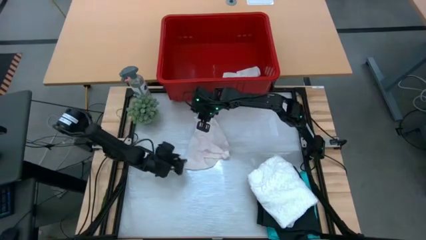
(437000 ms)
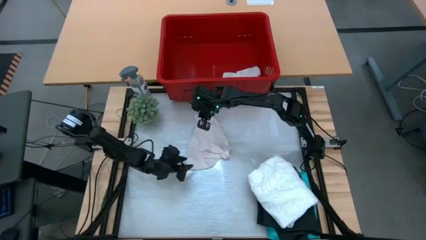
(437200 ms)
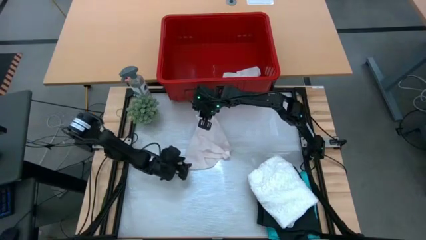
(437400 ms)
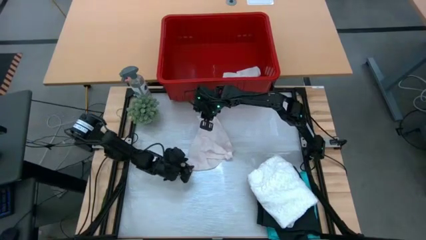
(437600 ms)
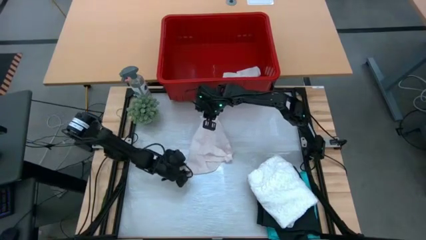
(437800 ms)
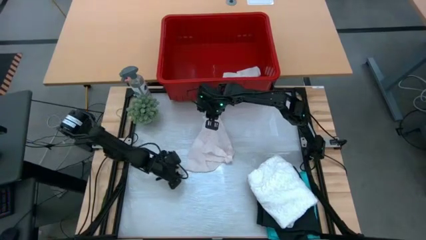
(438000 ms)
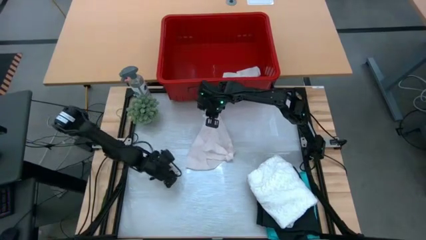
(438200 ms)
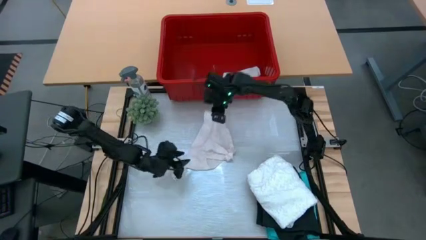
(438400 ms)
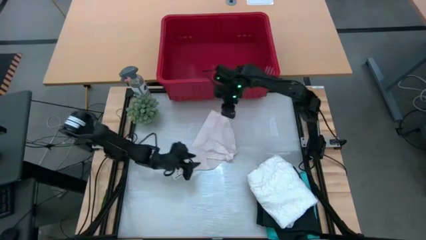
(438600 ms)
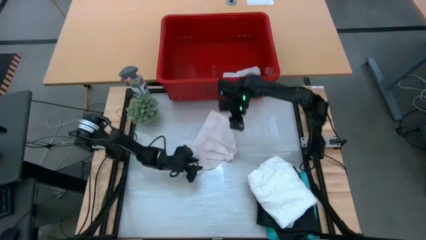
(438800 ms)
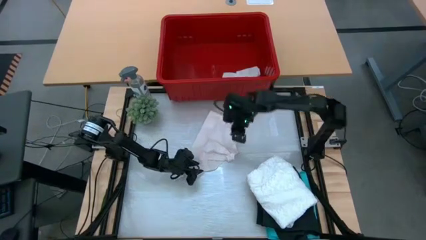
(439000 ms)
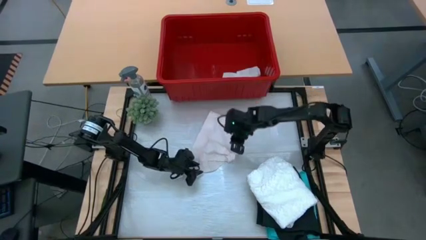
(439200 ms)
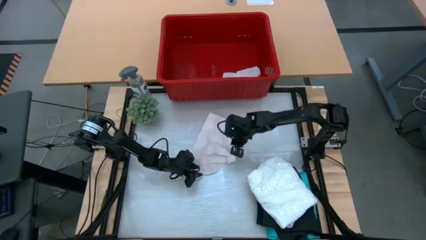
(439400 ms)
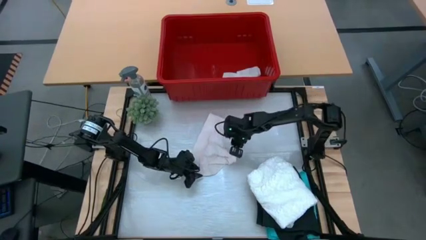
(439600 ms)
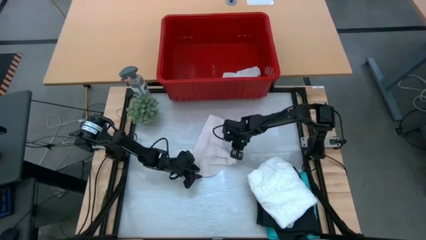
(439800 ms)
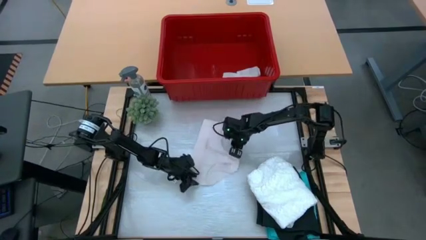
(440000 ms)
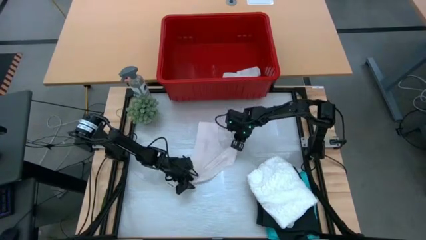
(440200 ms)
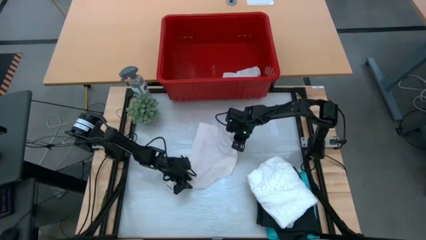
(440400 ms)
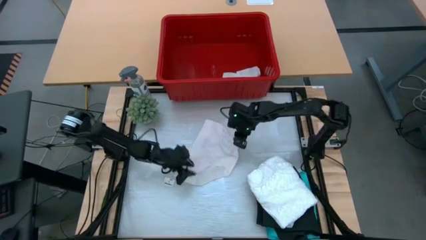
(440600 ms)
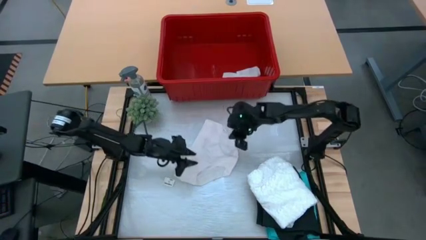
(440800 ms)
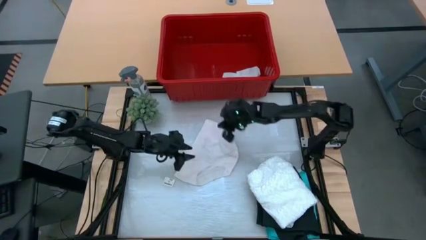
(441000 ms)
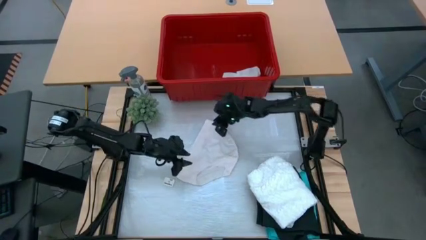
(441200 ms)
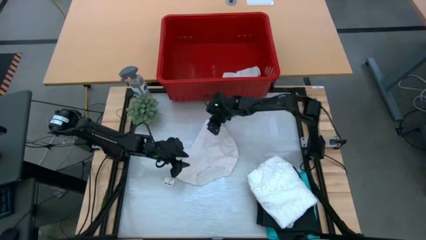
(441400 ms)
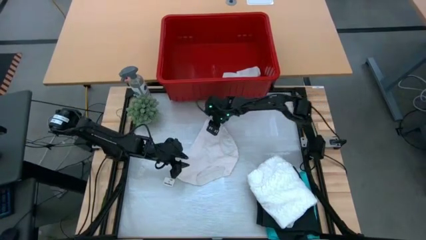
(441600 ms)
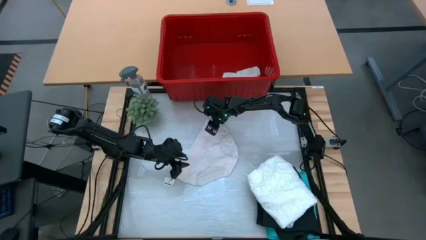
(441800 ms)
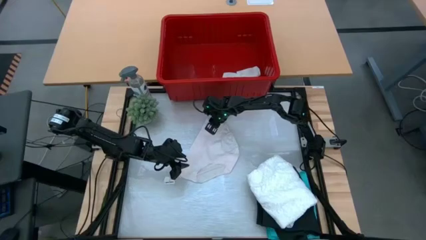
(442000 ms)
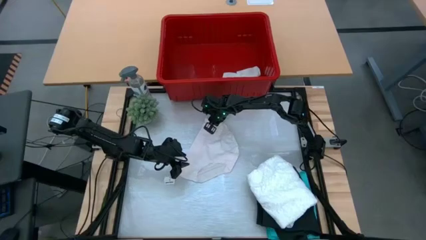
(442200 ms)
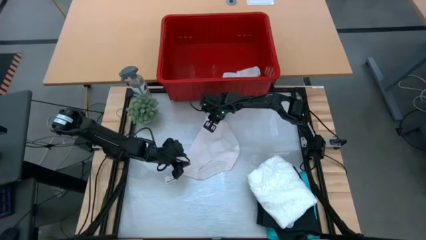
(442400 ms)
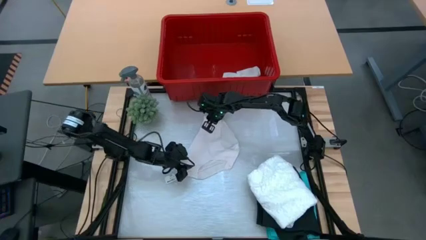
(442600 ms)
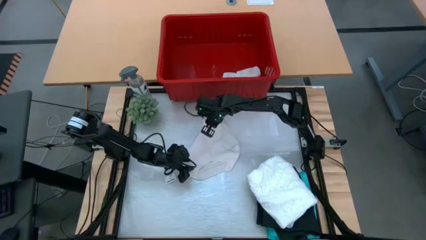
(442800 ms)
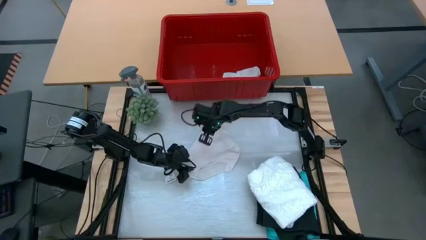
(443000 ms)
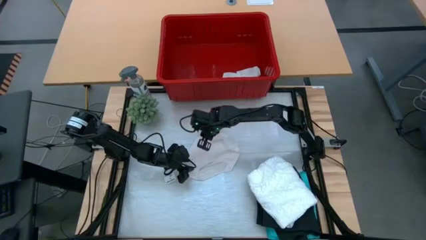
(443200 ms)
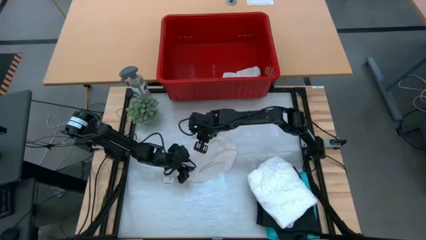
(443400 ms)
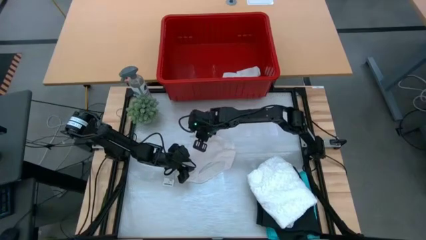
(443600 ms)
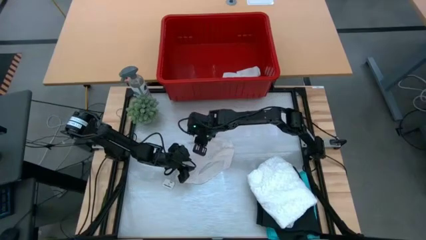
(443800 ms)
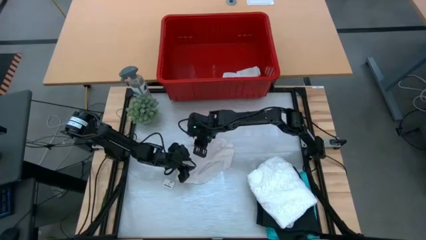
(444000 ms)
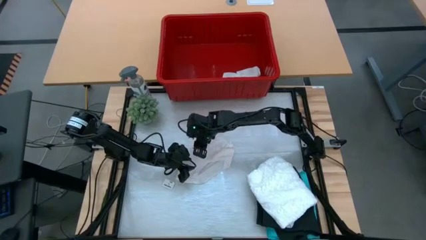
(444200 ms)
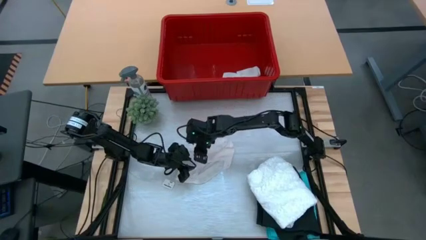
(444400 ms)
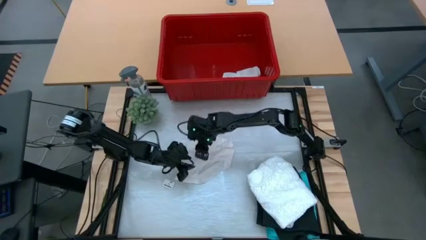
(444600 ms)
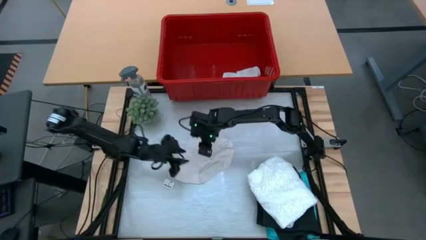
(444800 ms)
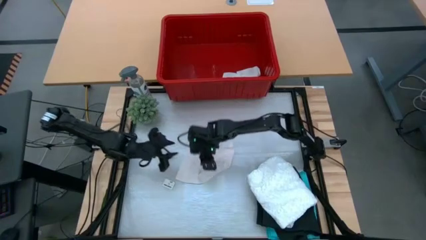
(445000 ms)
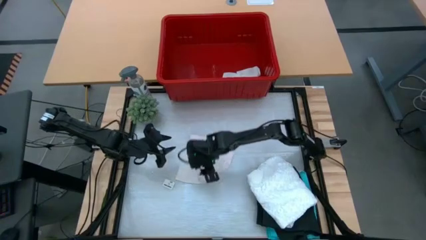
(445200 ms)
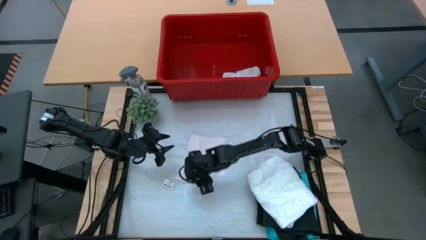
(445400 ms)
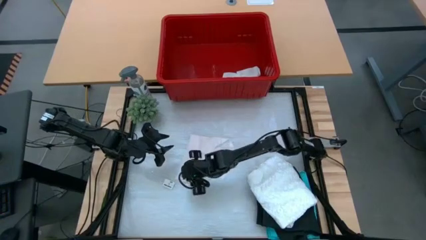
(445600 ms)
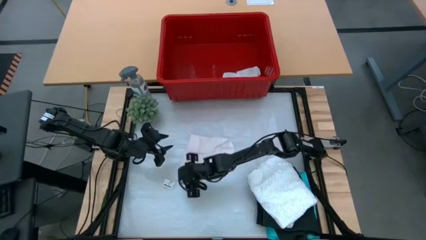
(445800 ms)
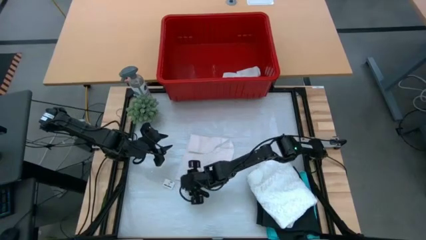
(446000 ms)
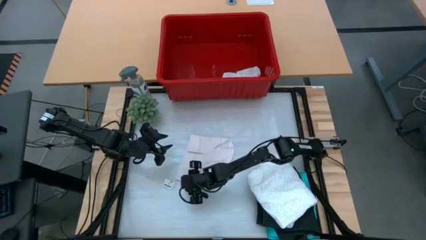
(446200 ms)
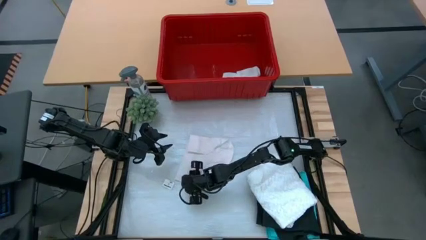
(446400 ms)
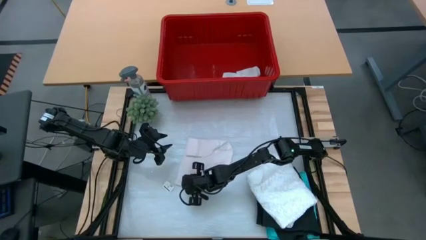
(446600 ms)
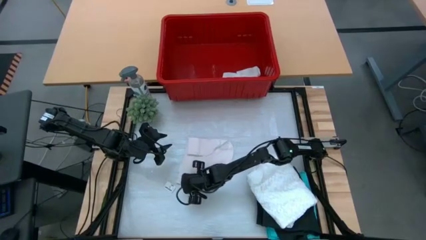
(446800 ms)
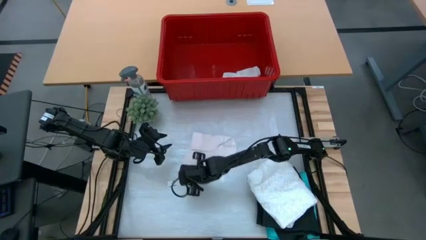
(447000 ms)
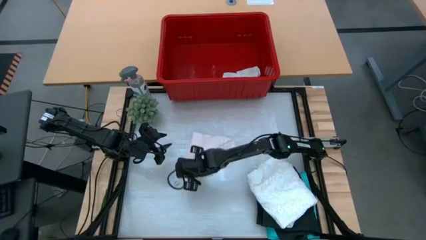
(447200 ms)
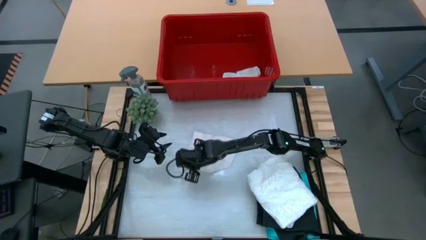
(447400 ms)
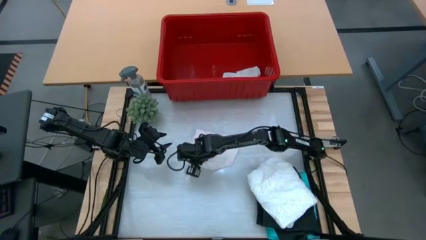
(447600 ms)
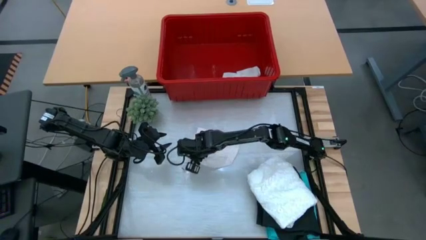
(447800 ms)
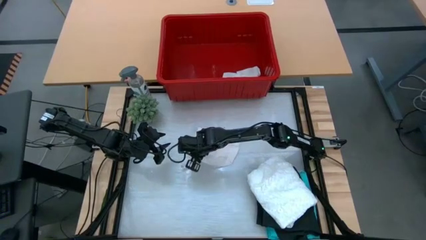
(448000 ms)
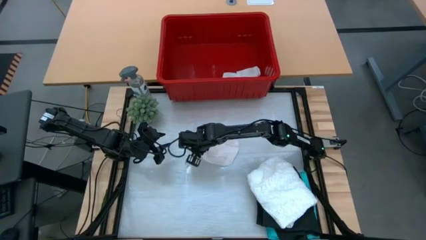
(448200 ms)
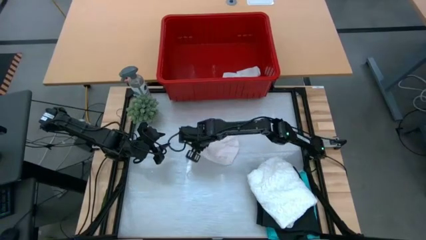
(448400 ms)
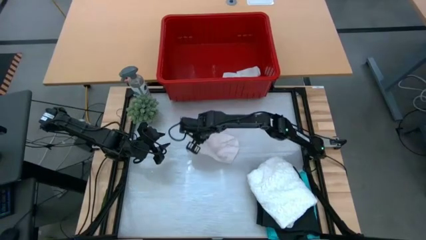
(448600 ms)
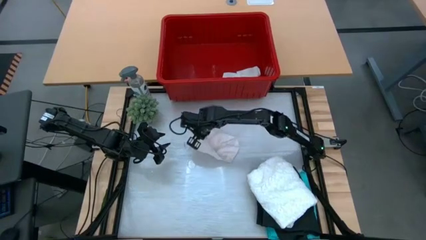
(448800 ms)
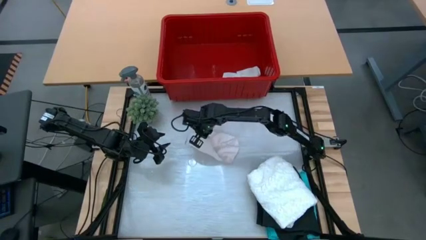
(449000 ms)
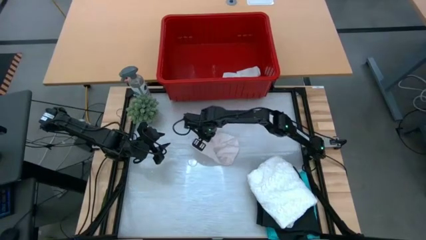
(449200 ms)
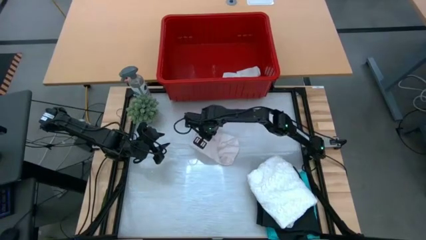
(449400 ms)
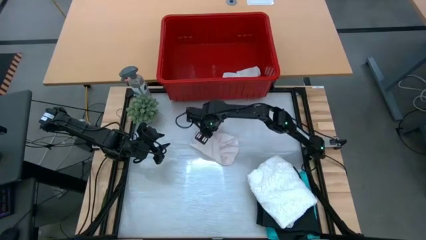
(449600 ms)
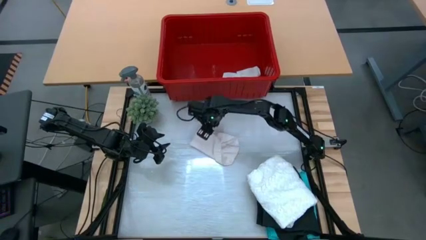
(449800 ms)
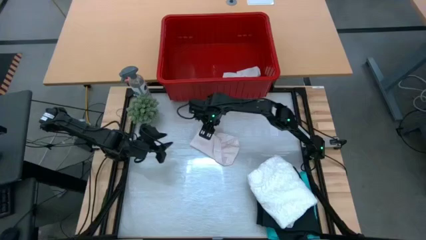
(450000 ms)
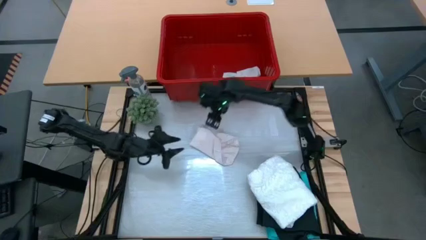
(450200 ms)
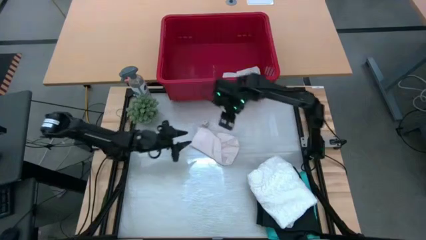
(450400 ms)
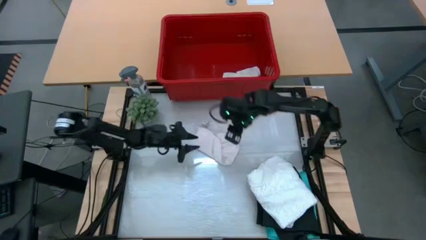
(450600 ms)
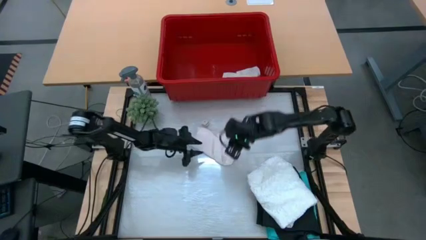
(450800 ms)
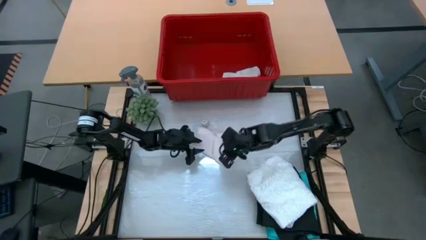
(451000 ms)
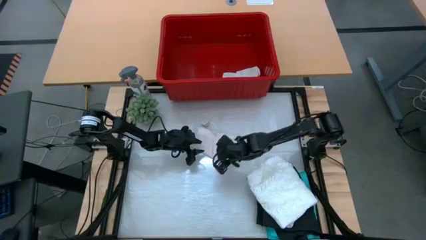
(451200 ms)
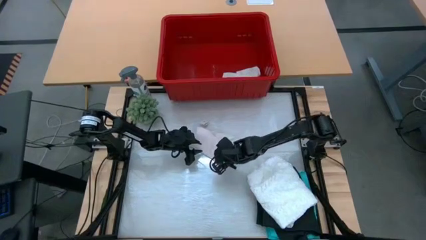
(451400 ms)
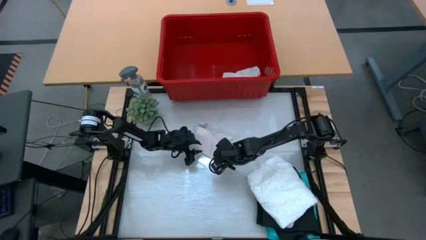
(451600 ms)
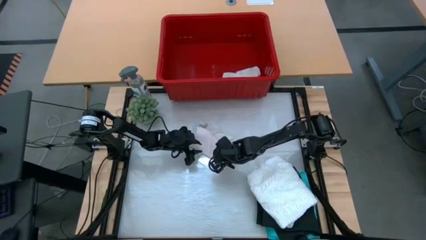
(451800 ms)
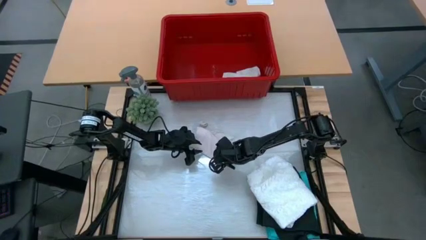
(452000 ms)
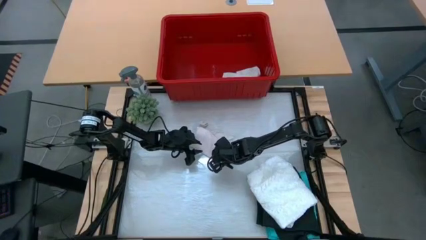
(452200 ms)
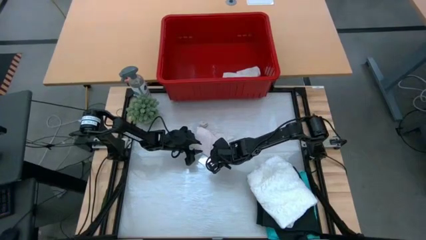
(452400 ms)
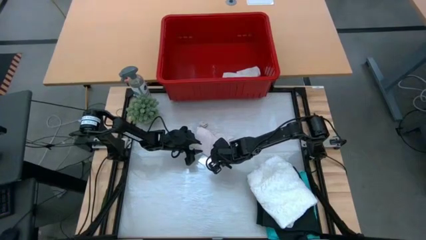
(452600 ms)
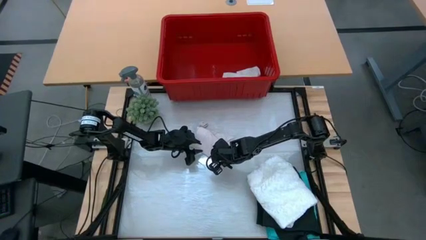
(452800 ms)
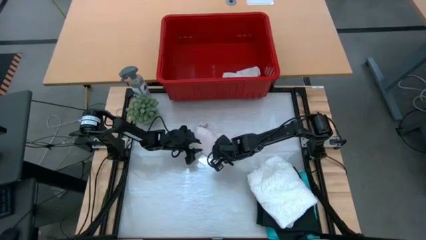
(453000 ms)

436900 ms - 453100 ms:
Task: Fold Laundry from Bin
Fold the white underwear
